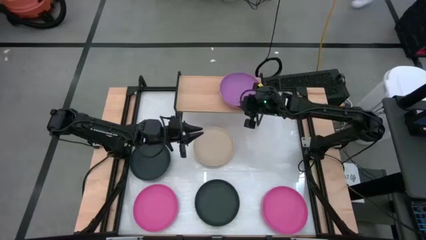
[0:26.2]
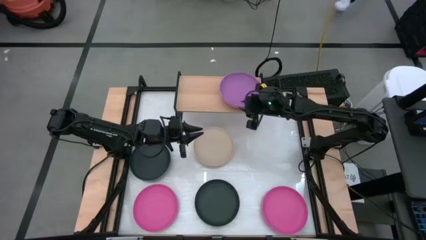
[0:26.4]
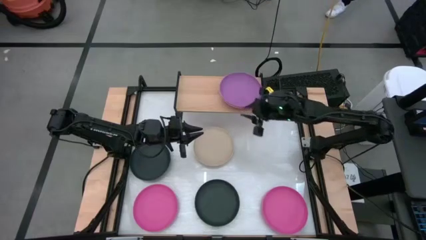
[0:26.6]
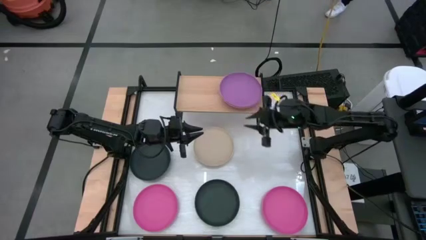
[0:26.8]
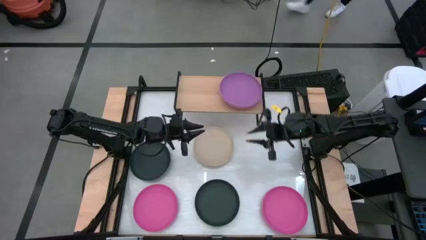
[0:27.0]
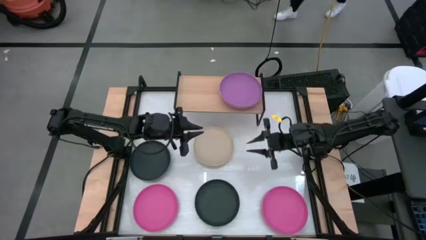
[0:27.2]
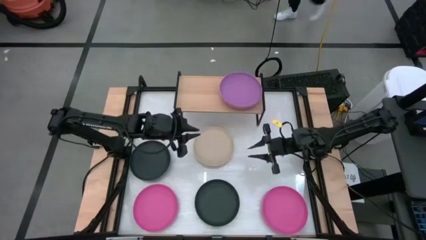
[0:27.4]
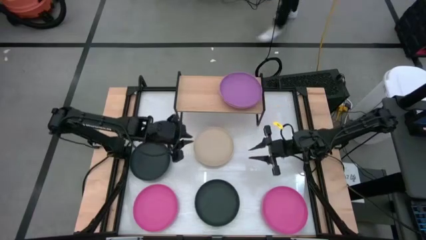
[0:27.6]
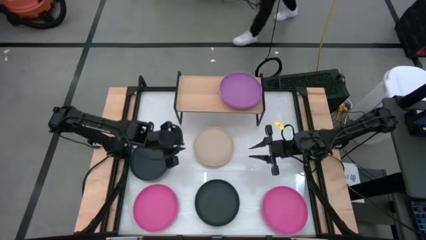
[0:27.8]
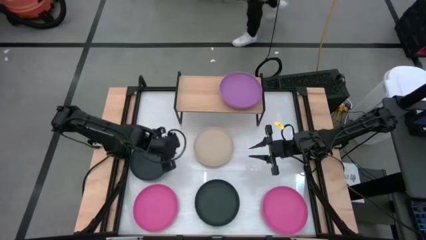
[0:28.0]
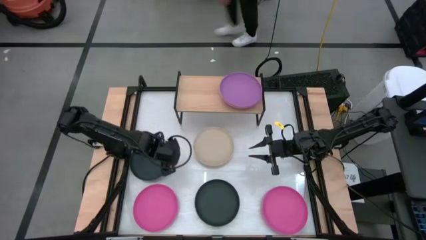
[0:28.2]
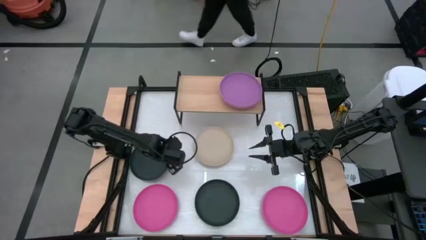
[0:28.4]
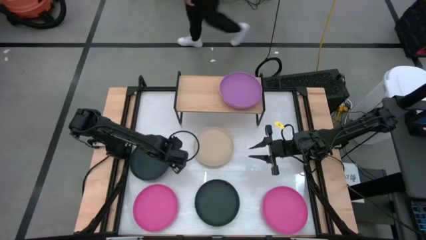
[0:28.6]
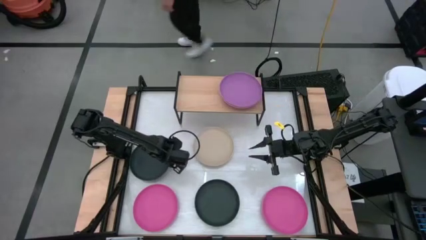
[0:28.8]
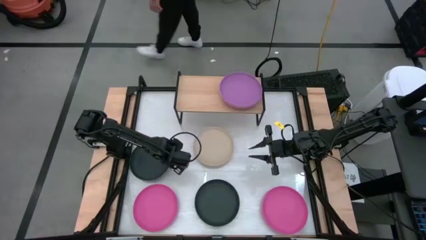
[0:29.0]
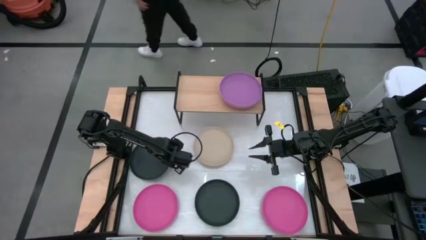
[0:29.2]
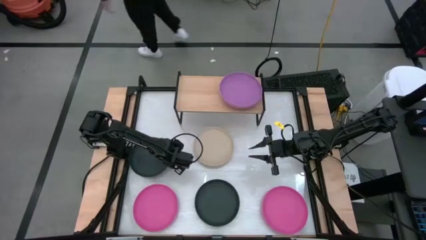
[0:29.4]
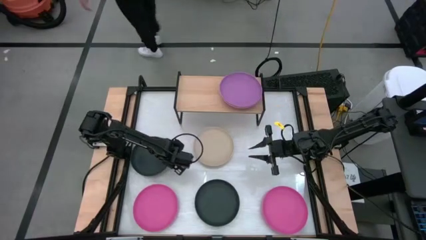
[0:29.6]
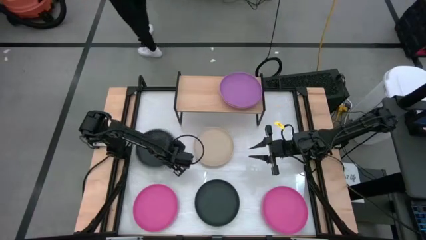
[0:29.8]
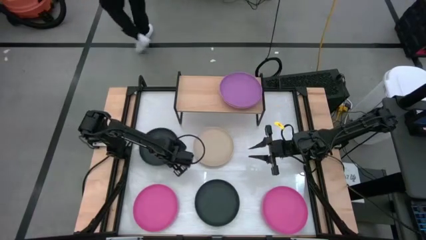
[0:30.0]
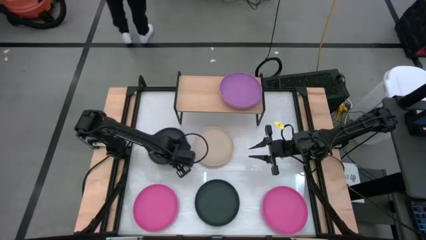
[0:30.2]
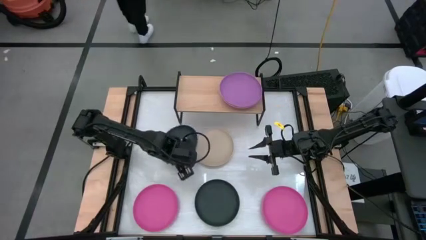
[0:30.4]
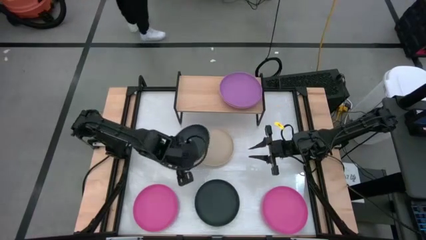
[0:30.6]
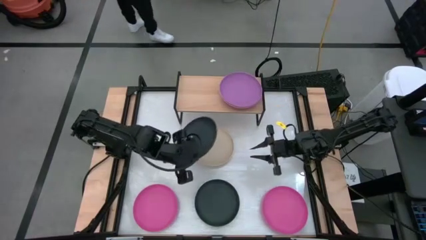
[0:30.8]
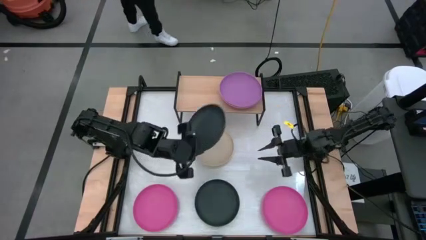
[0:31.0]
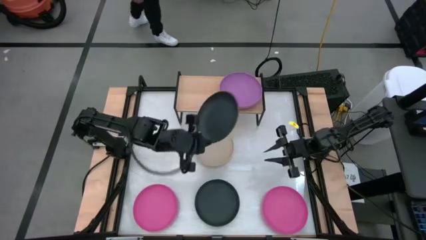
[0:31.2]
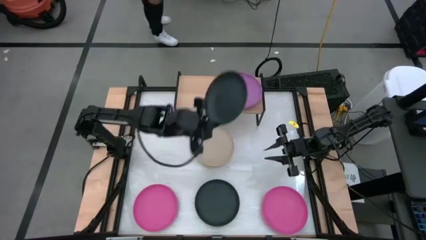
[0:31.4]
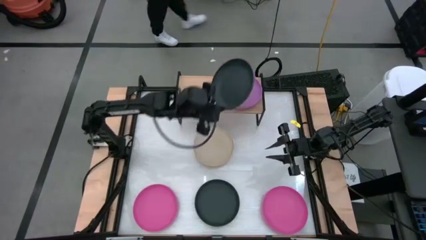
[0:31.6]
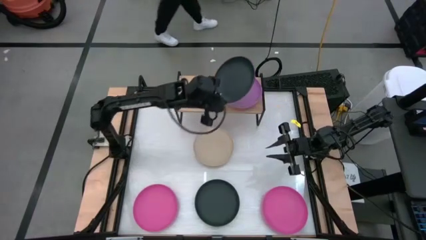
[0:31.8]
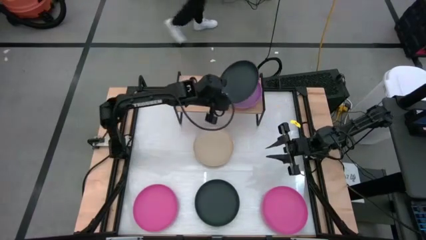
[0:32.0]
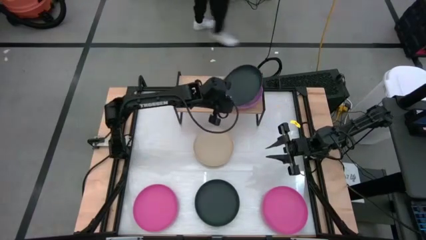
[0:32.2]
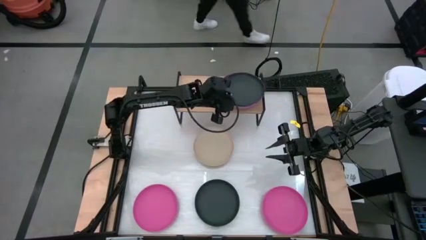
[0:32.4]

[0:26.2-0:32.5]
Task: Place and stack plates onto a shelf
Stack the top black plate on top of the purple plate on the shelf

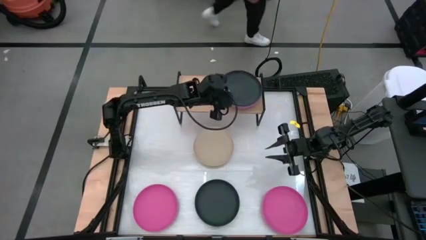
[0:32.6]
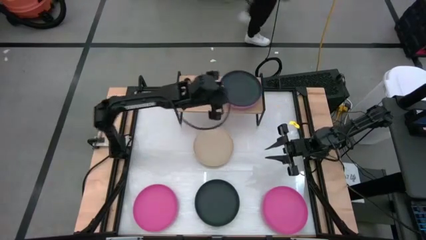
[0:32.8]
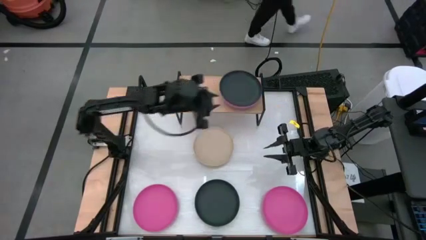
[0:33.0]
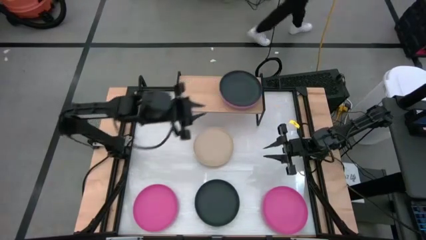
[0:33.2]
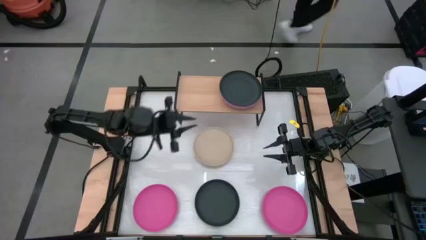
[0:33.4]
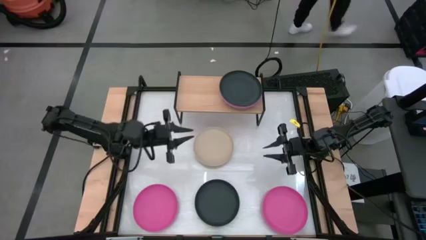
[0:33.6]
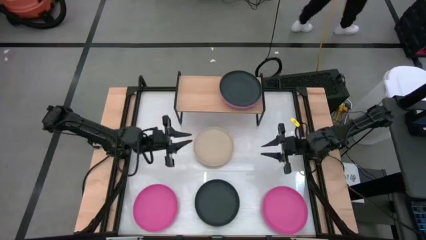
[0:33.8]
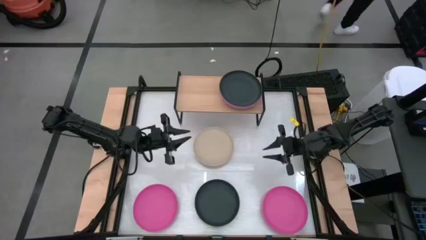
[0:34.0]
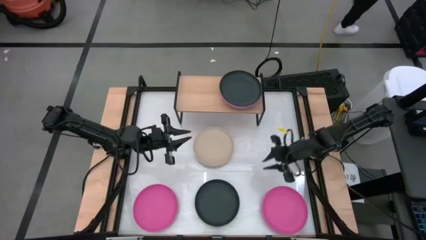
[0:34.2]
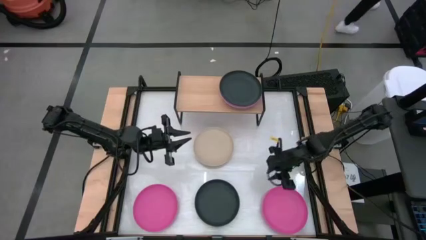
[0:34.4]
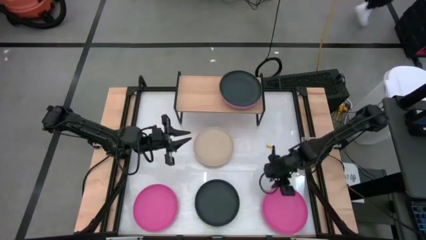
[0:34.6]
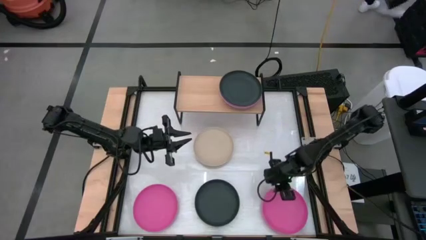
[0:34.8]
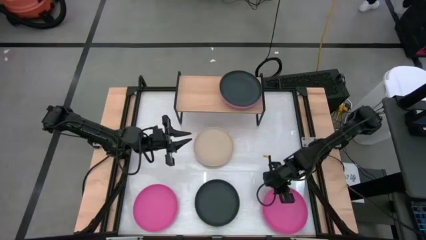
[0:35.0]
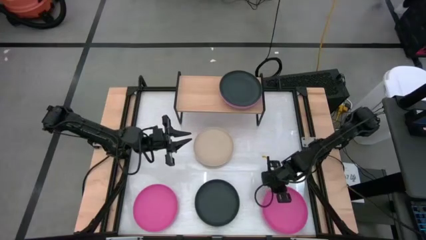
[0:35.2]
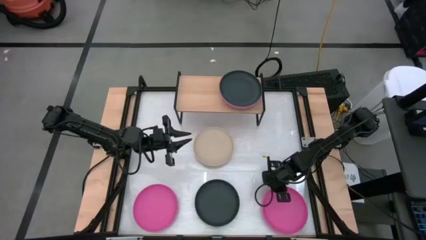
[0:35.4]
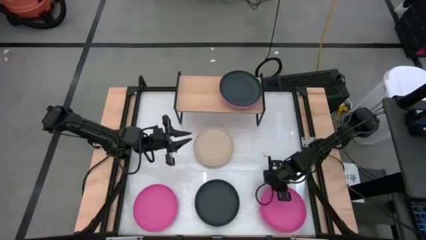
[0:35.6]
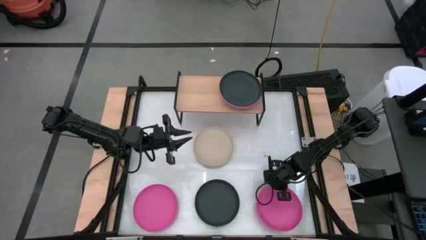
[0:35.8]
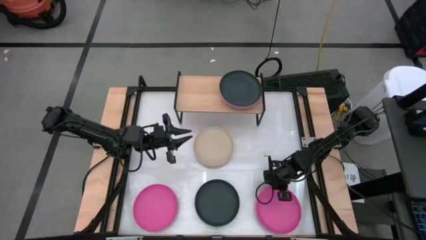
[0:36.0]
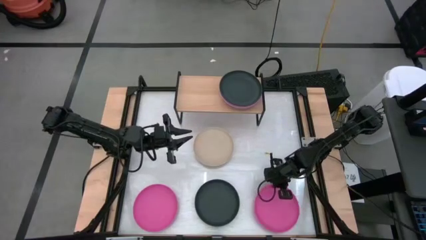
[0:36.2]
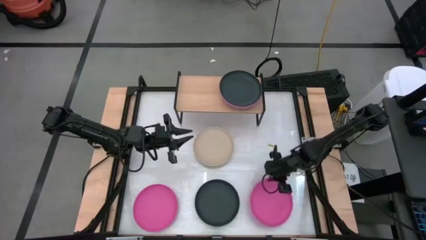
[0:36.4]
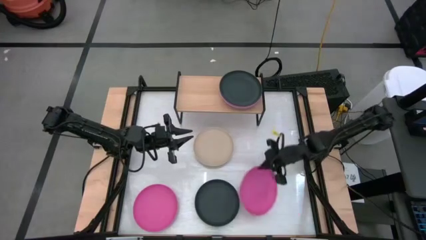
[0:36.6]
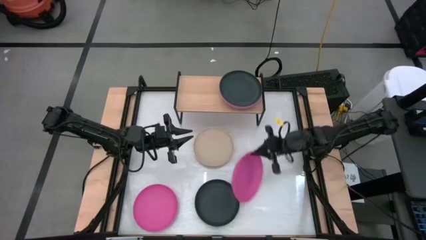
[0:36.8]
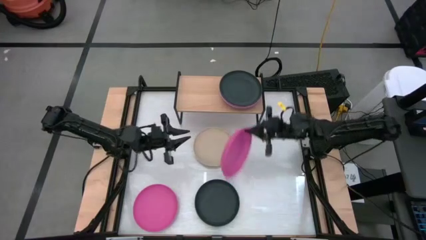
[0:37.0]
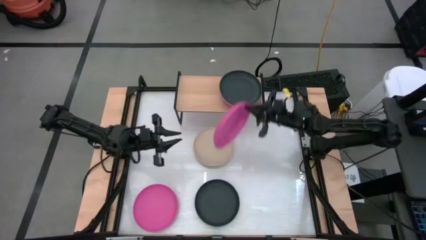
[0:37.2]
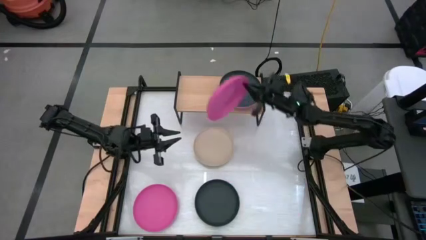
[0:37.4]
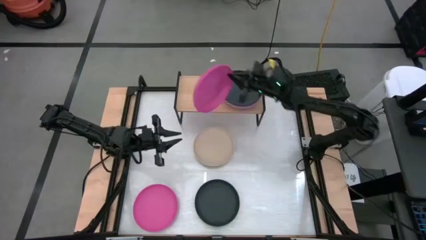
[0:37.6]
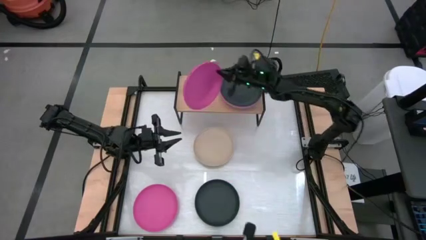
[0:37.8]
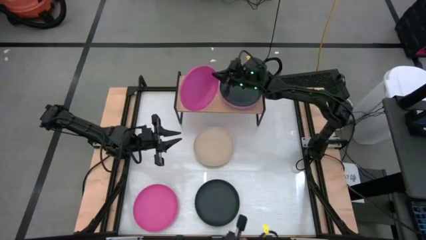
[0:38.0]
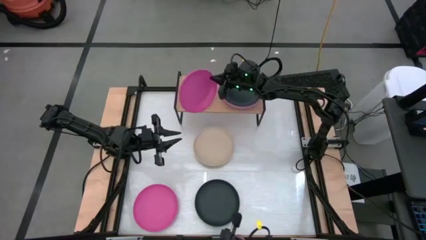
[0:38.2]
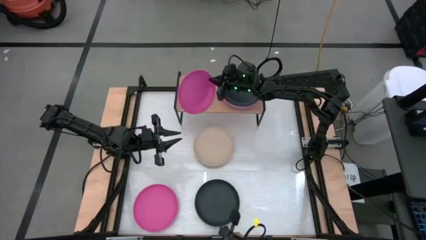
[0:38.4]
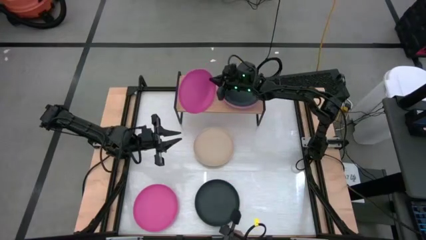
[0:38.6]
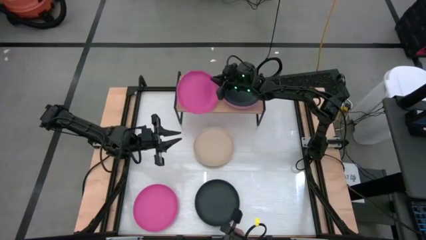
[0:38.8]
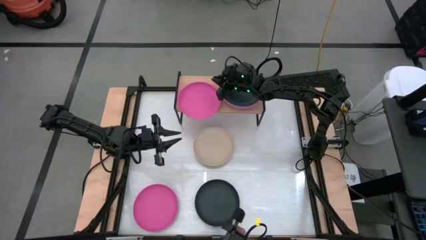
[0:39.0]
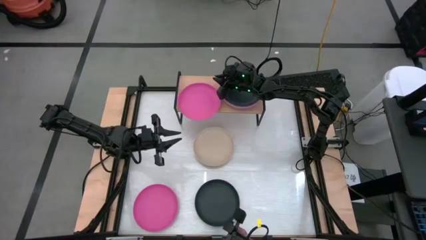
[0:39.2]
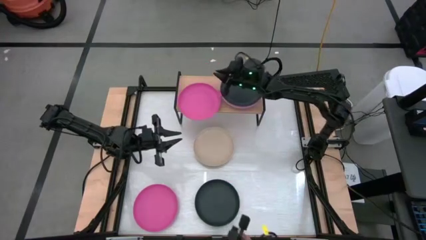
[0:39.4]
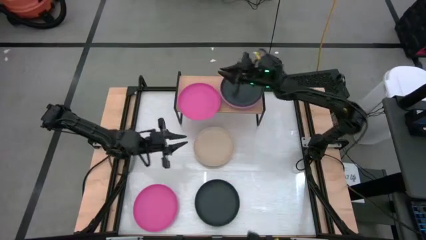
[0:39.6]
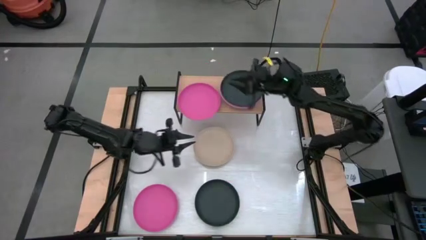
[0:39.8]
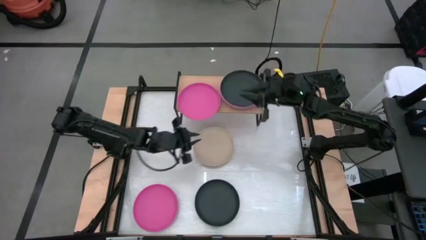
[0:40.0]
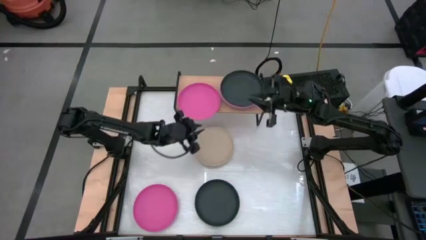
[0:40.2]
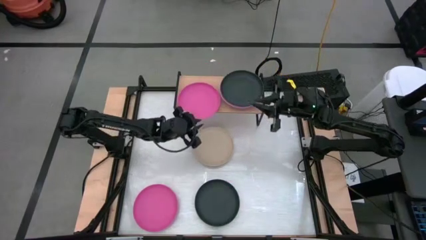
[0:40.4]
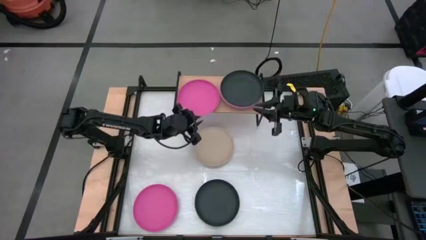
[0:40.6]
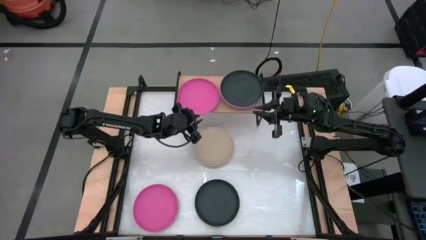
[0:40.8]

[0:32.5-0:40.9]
Put the right pink plate on the shelf
